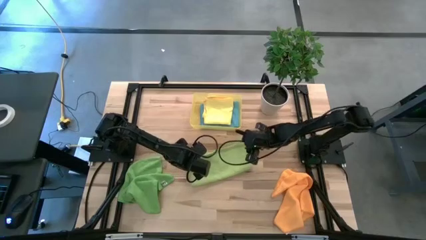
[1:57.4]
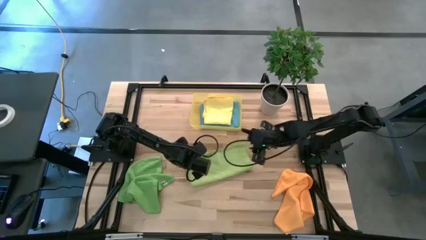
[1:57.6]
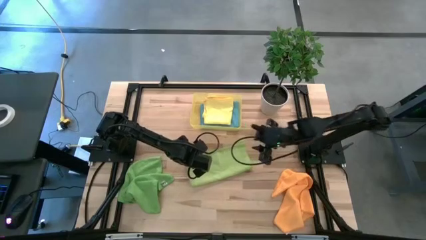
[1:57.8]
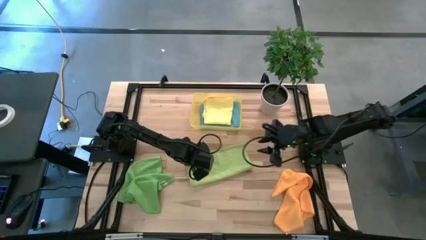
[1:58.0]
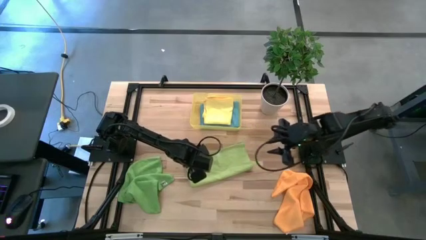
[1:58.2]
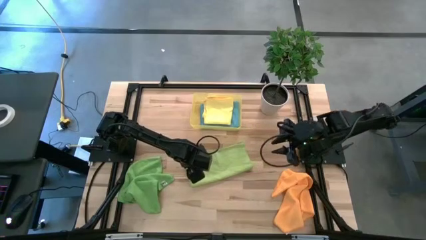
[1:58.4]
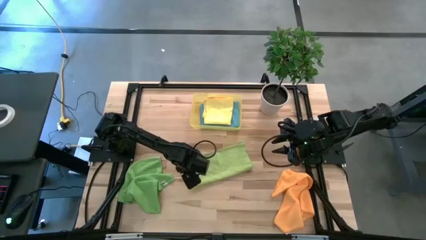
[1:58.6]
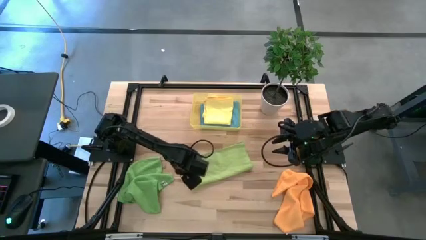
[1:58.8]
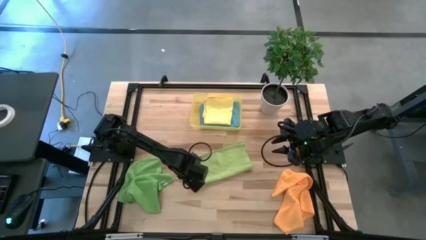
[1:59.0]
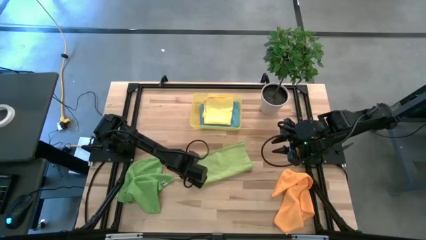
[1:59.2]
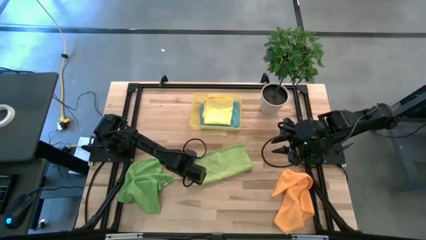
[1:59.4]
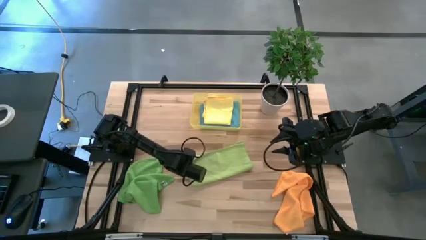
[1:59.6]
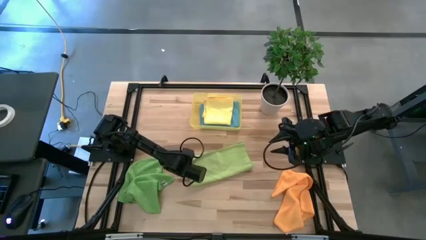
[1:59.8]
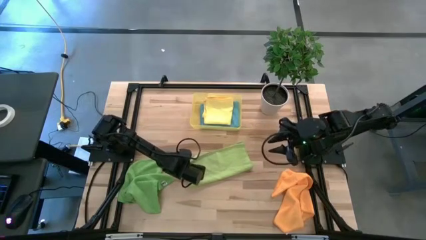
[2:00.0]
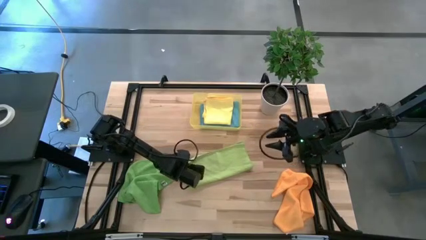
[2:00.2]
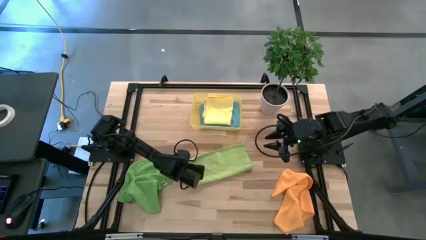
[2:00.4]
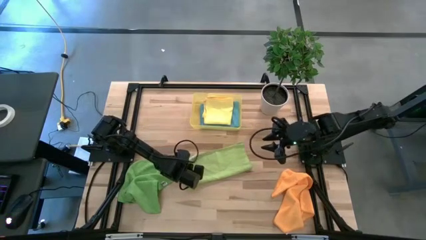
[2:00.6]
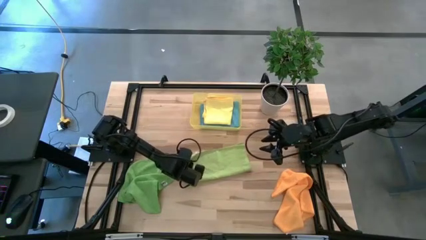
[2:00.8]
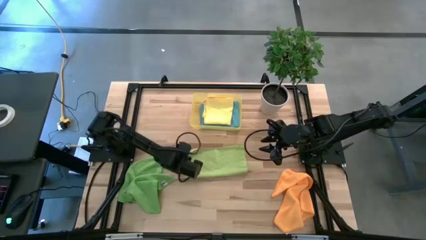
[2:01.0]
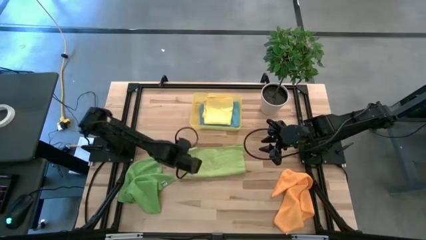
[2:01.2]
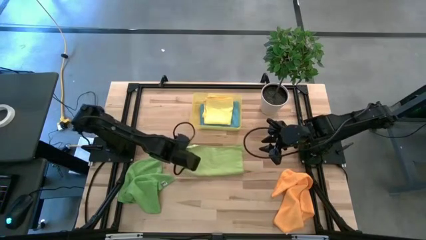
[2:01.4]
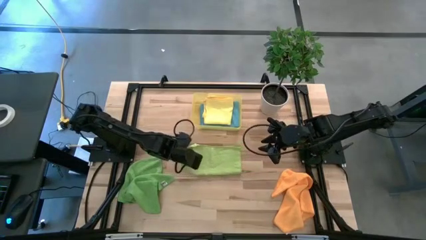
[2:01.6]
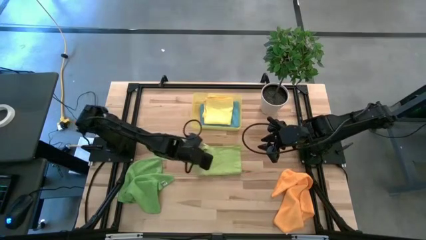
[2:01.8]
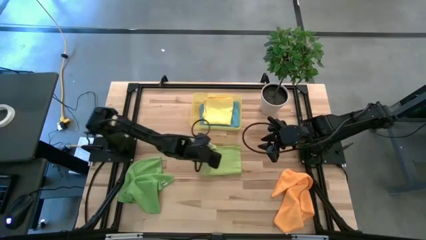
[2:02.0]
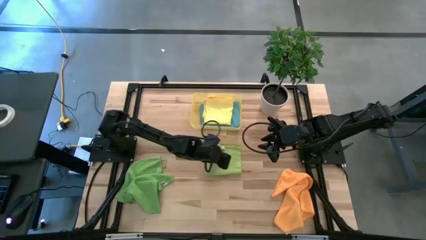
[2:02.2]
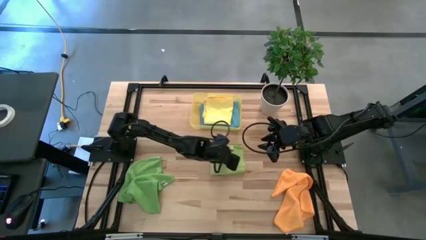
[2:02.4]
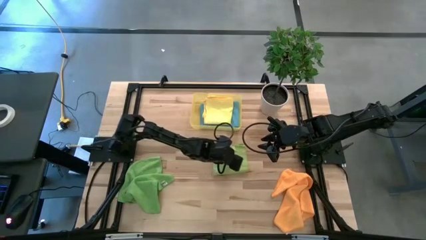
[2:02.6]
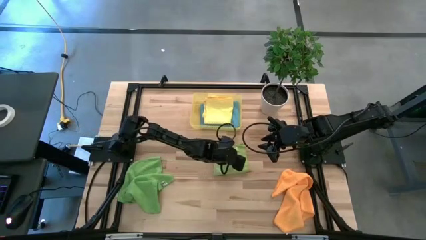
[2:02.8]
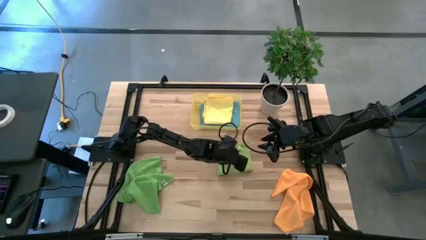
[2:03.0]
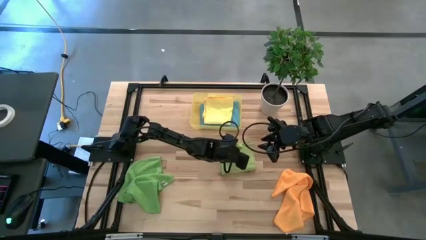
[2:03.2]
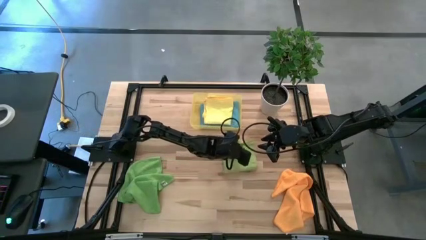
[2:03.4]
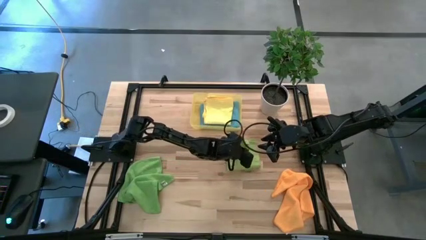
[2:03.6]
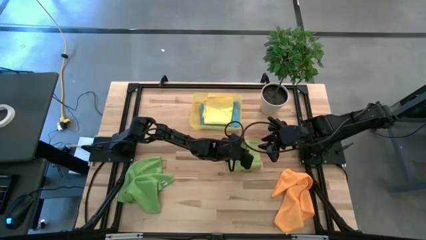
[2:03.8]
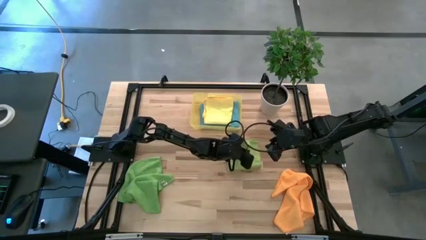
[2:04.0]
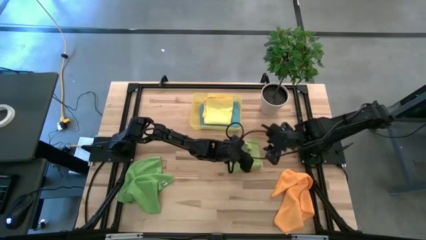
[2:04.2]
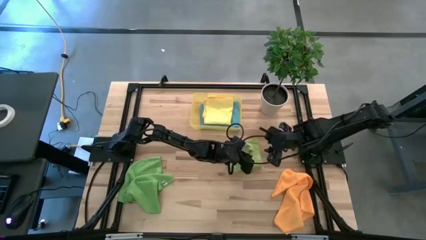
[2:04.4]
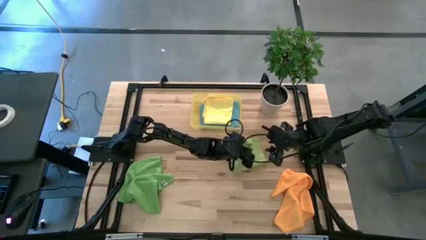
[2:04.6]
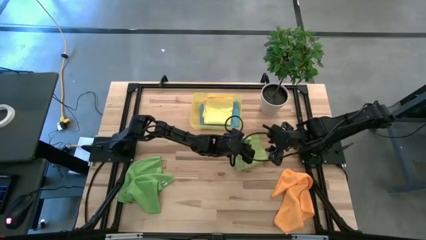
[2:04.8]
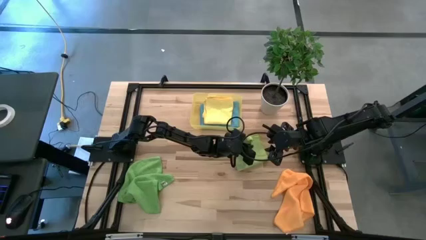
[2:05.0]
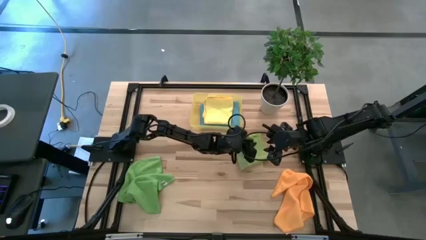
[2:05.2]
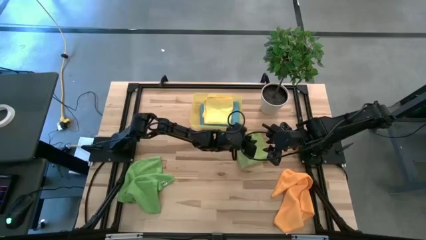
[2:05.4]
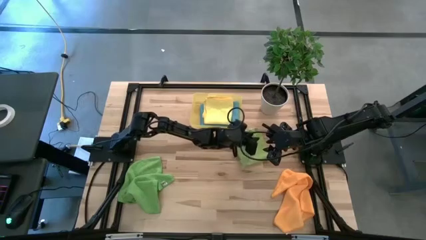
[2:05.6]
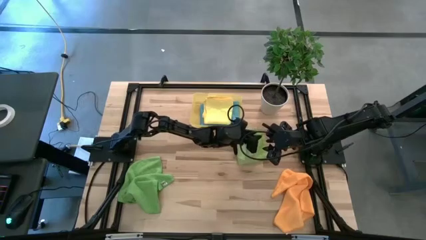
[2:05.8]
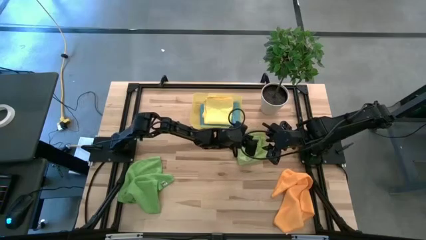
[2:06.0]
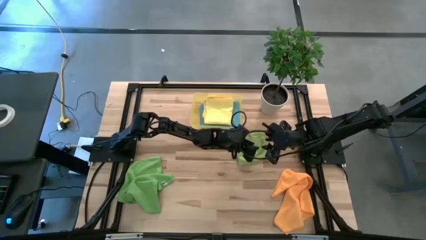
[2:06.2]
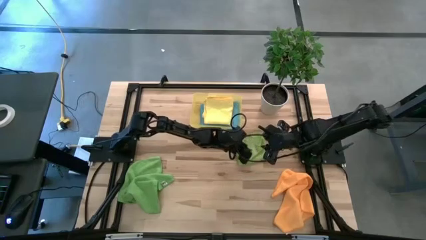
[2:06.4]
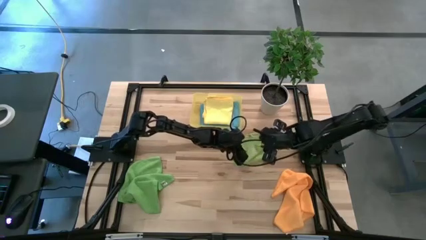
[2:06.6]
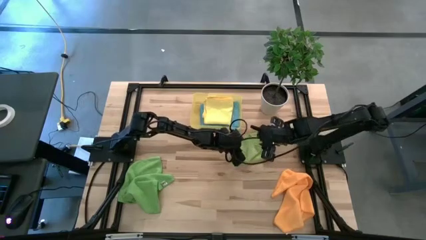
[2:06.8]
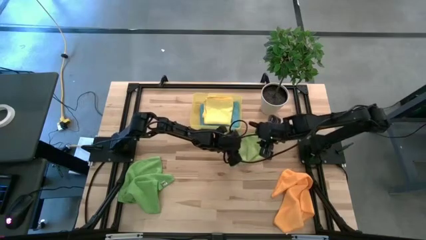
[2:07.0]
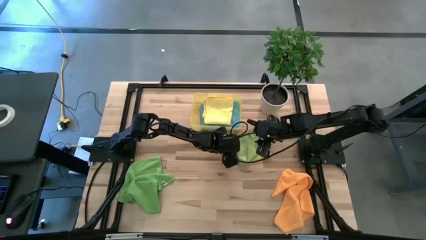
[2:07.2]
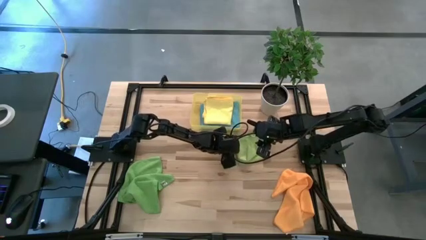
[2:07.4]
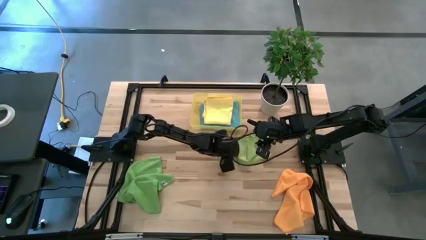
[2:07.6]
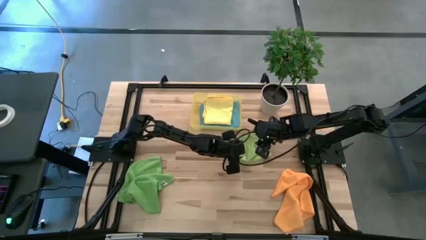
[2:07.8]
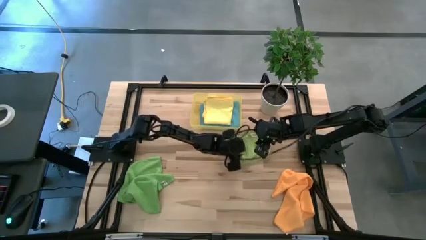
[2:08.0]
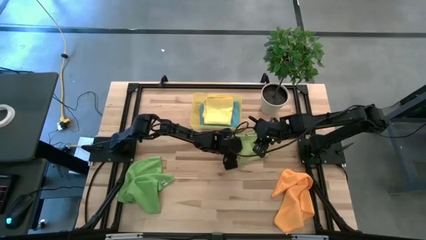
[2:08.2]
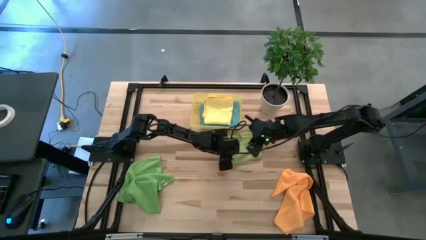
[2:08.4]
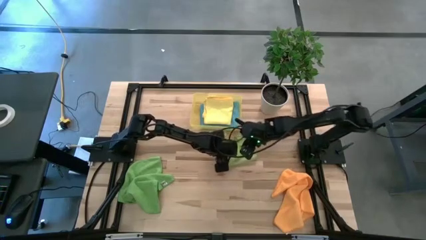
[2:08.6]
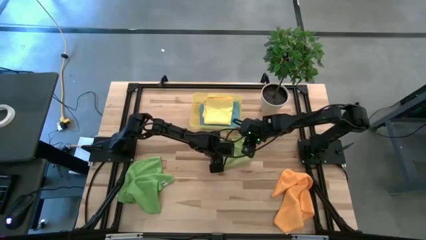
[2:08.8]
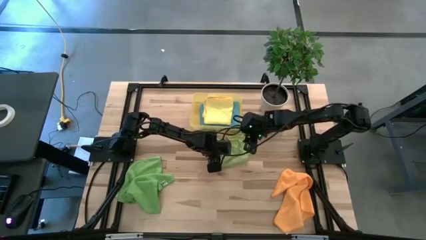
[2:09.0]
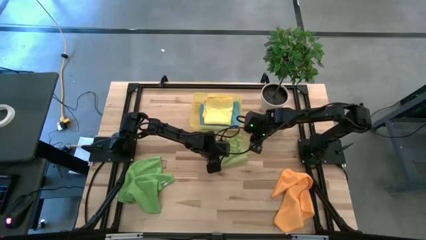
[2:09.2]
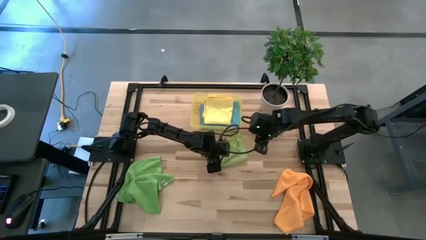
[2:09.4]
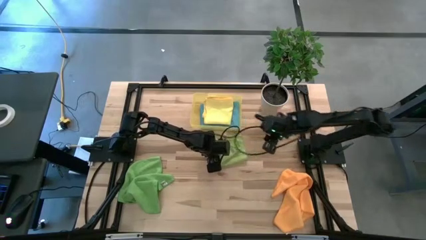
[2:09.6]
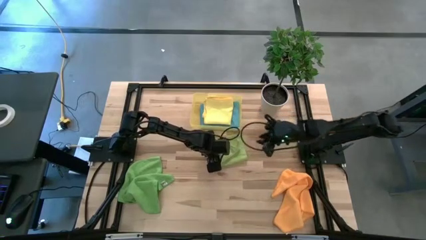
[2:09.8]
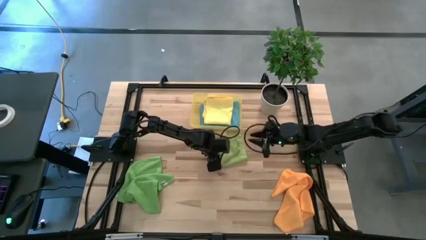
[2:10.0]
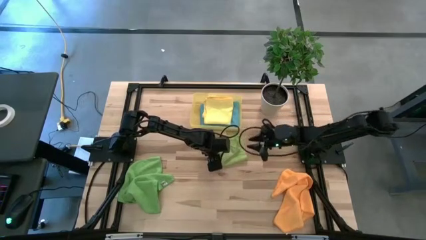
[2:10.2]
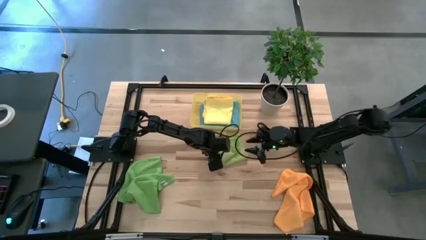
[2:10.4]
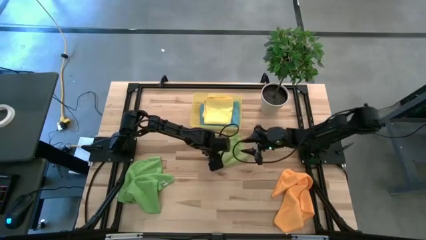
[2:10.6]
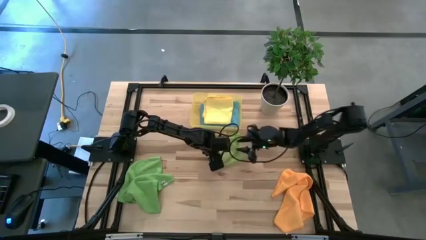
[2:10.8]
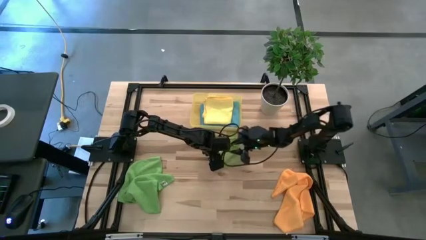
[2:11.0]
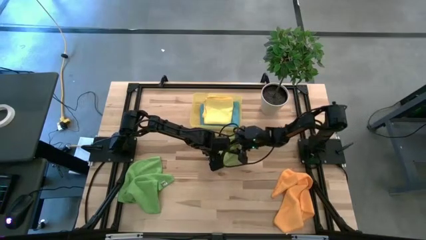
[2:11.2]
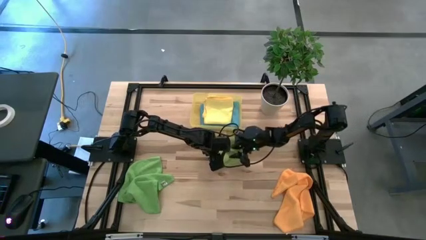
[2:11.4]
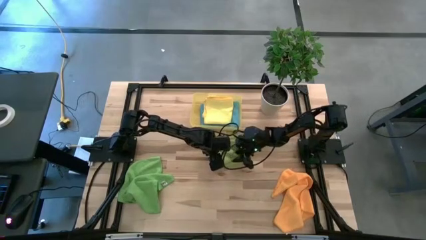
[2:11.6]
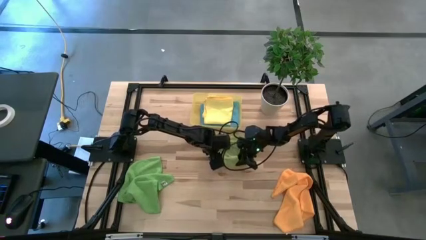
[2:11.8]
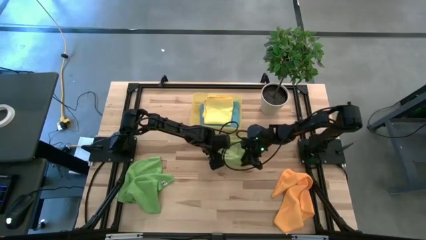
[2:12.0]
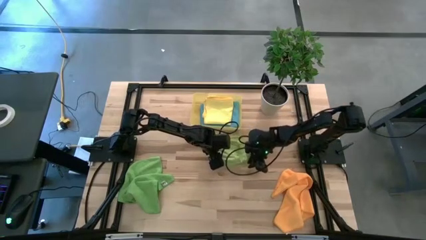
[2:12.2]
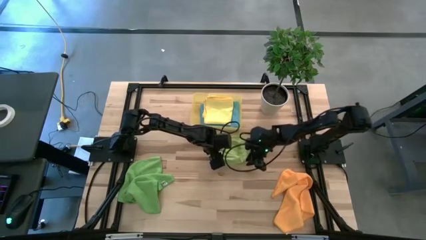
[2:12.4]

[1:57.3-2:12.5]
Task: Fold microfiber towels
Fold the light green microfiber cloth
